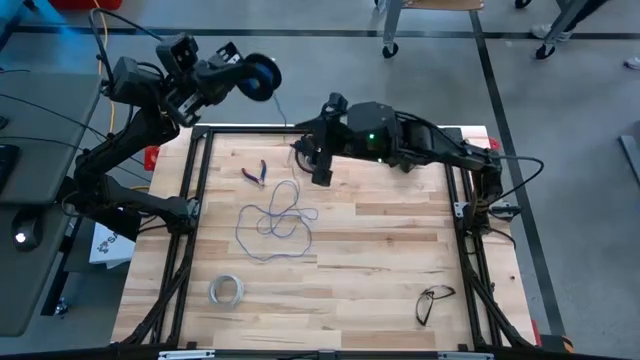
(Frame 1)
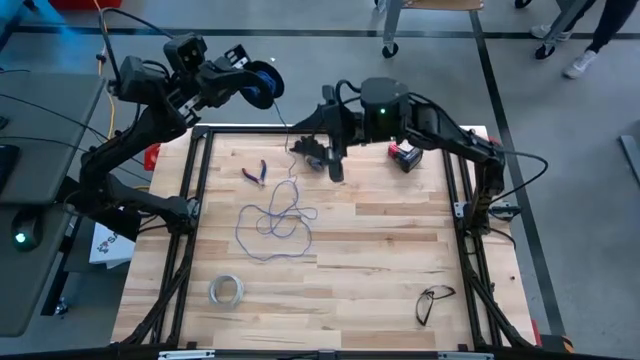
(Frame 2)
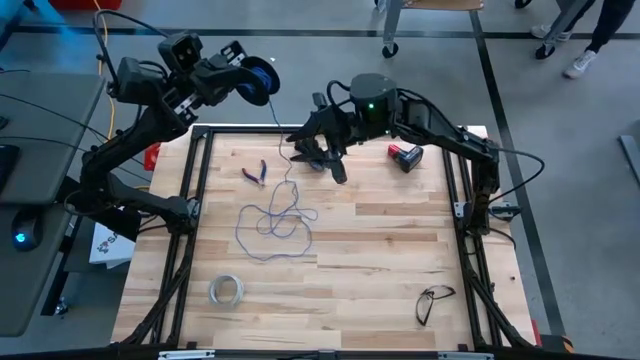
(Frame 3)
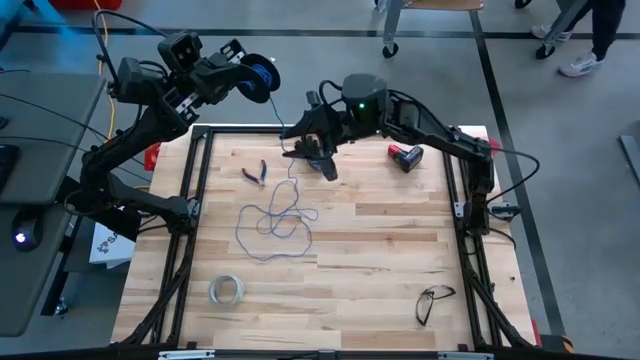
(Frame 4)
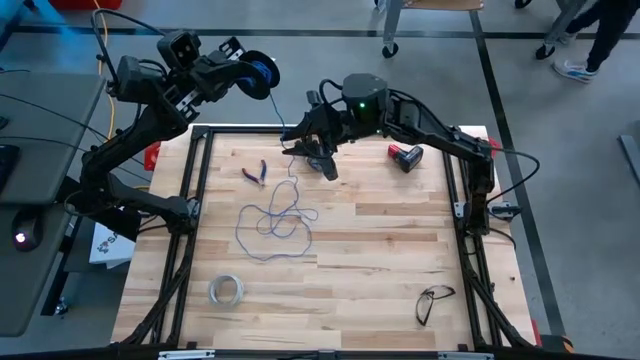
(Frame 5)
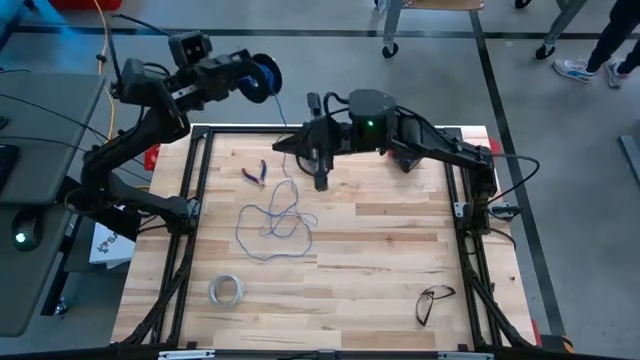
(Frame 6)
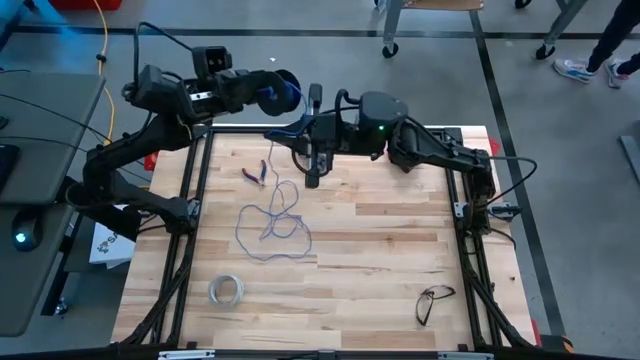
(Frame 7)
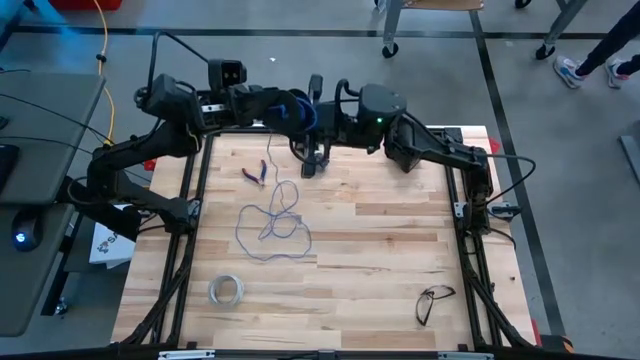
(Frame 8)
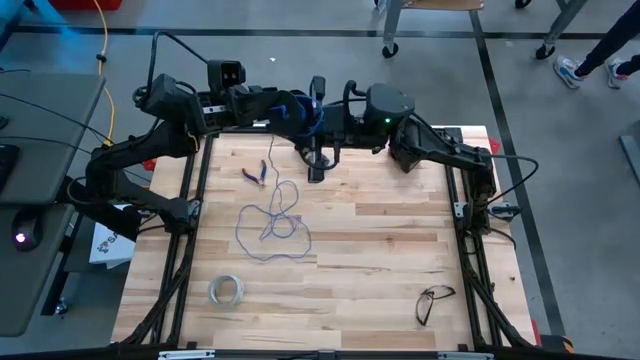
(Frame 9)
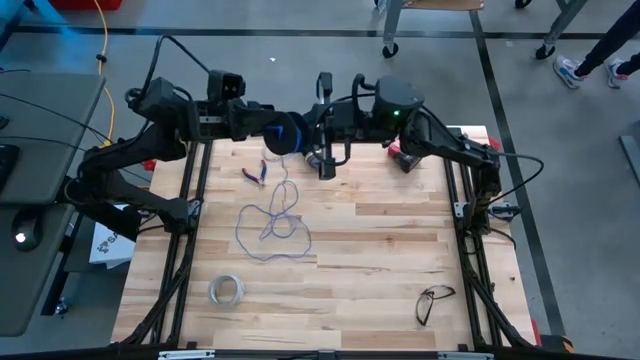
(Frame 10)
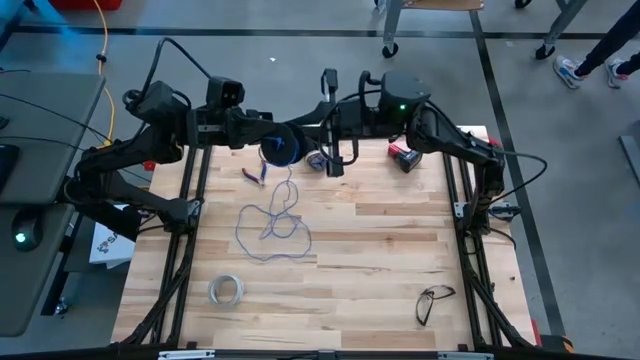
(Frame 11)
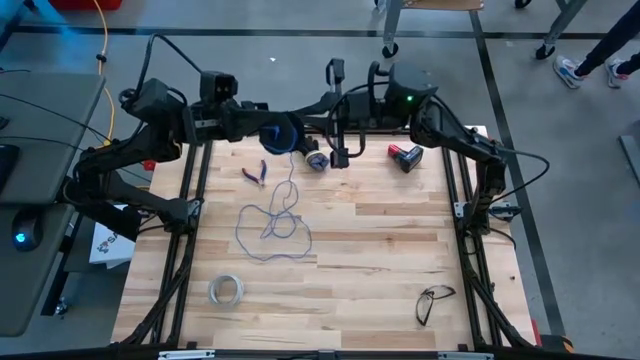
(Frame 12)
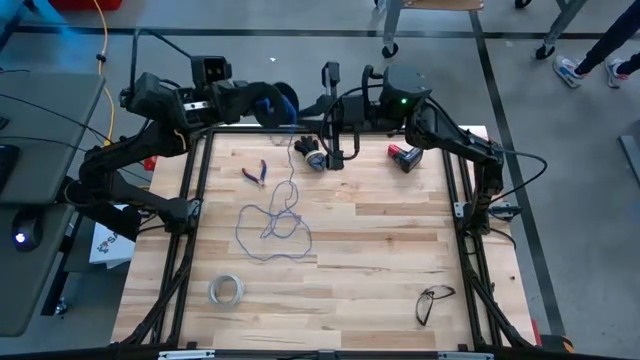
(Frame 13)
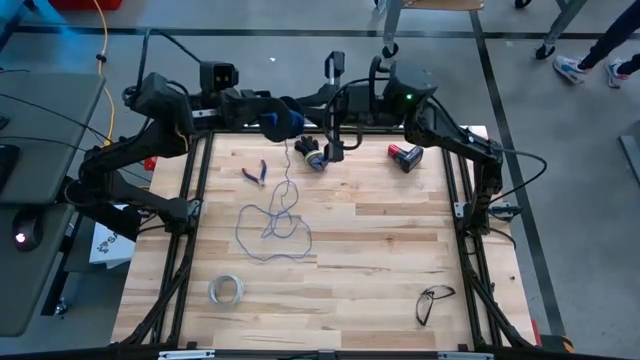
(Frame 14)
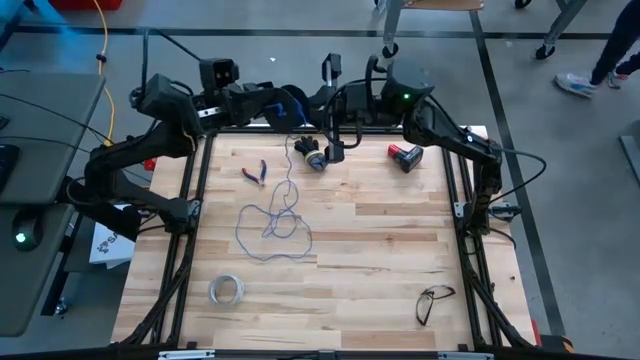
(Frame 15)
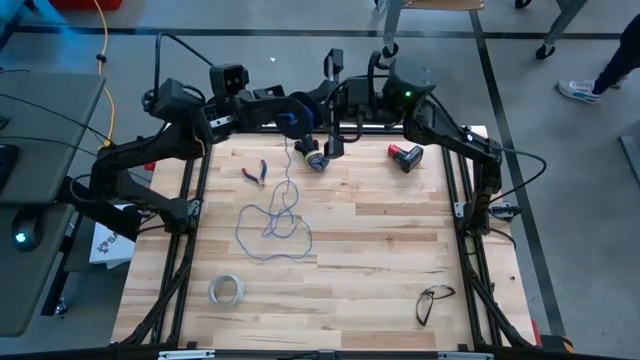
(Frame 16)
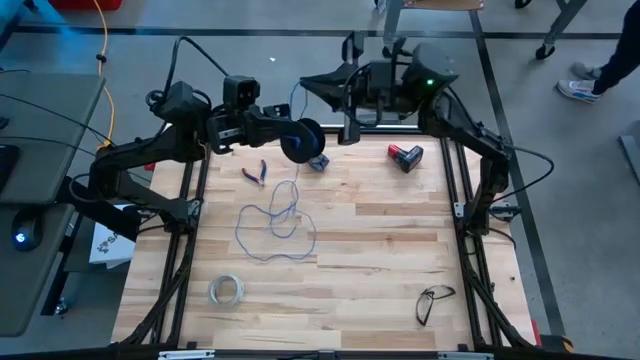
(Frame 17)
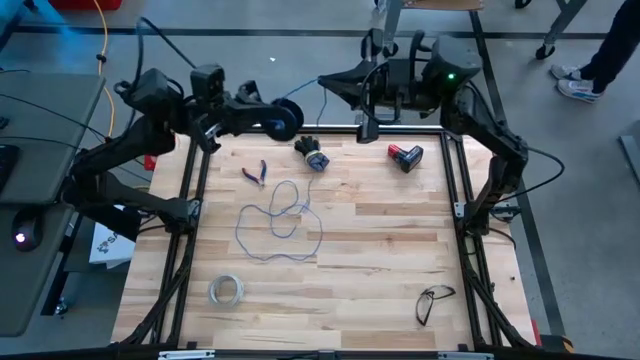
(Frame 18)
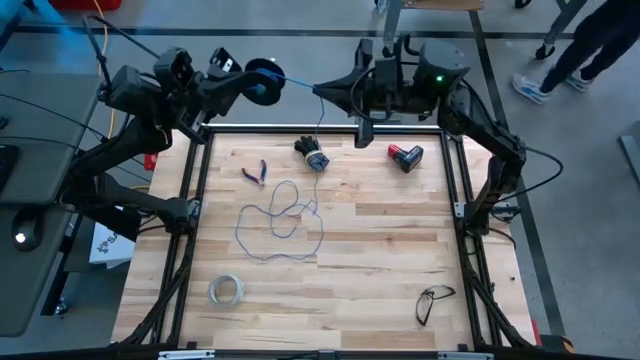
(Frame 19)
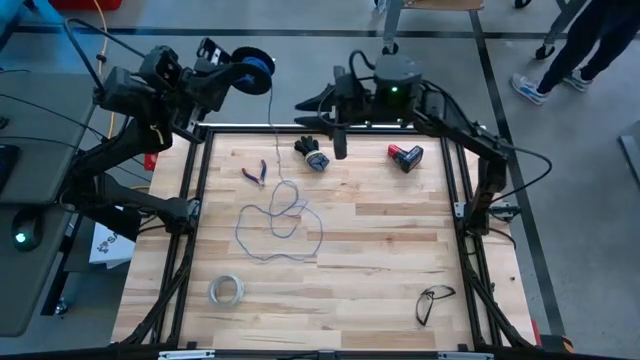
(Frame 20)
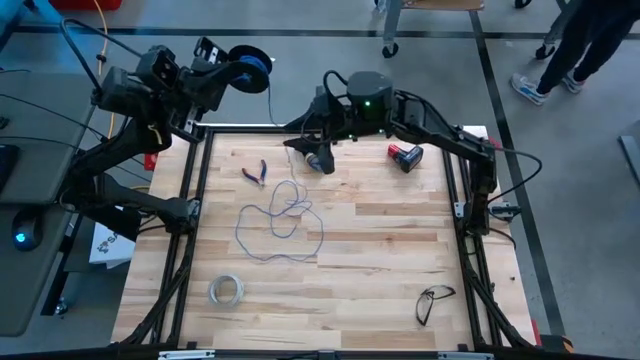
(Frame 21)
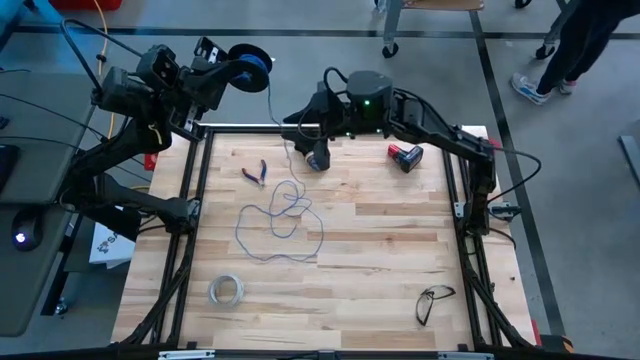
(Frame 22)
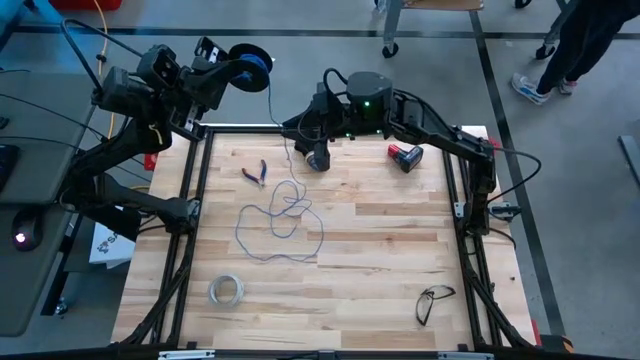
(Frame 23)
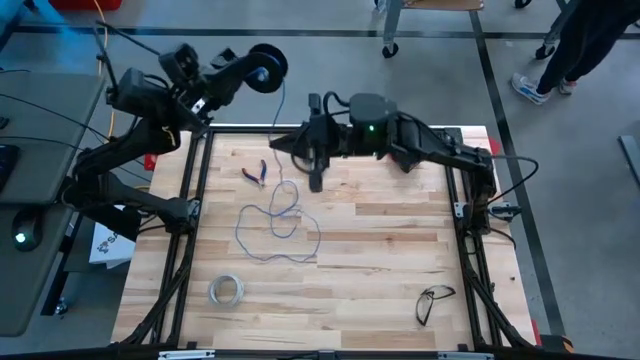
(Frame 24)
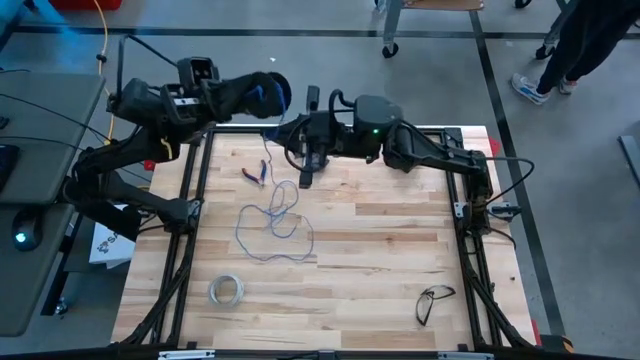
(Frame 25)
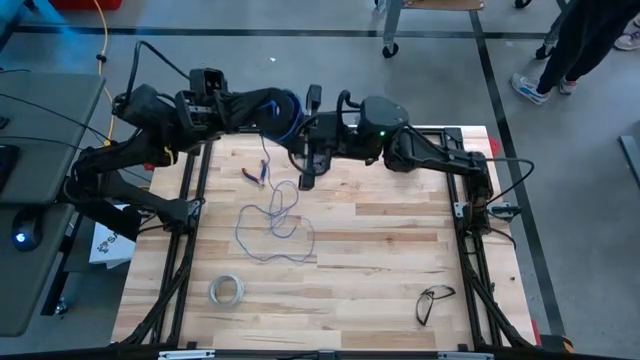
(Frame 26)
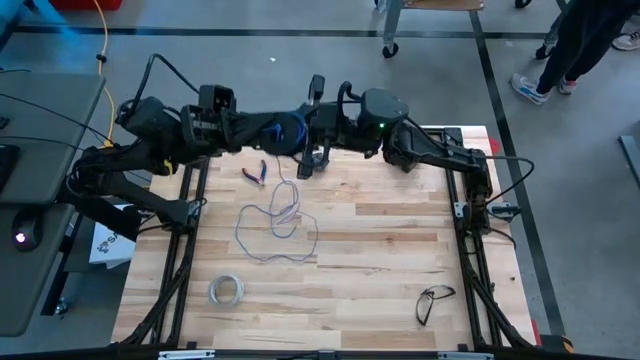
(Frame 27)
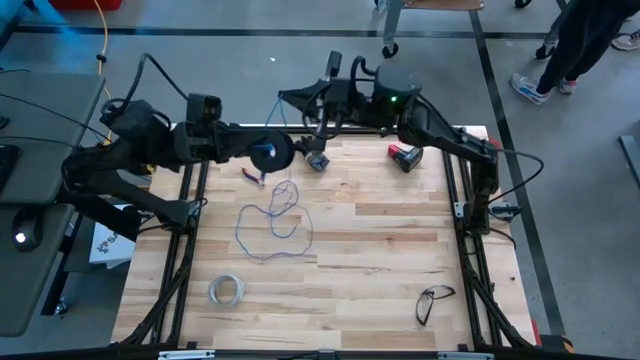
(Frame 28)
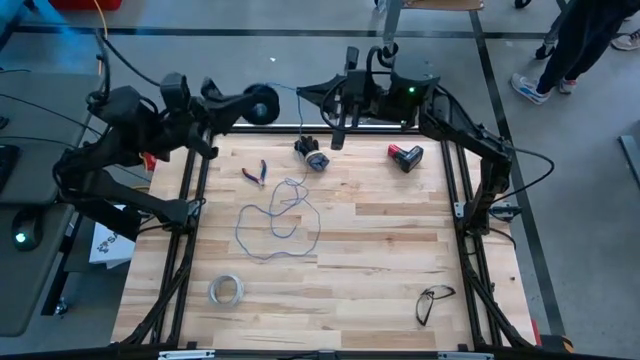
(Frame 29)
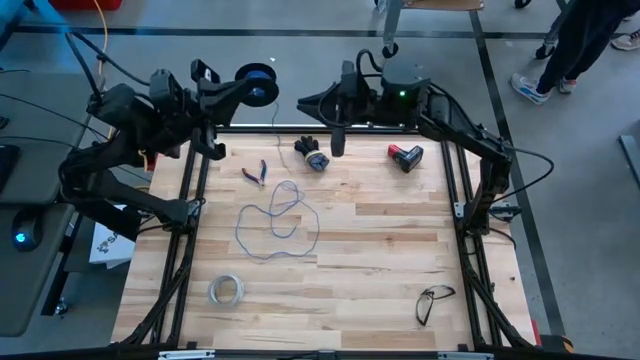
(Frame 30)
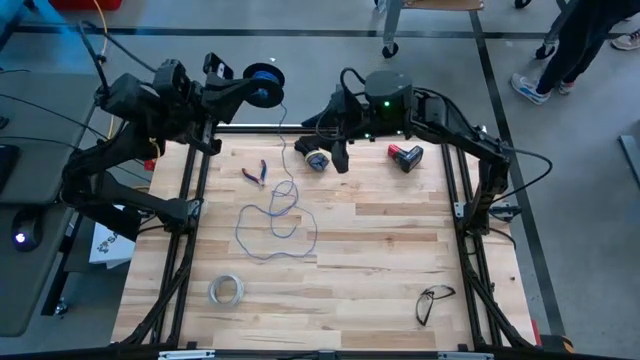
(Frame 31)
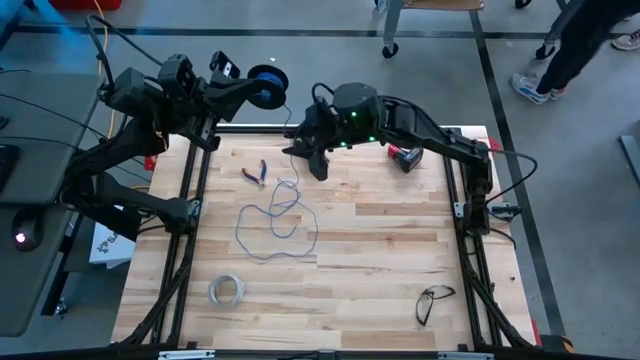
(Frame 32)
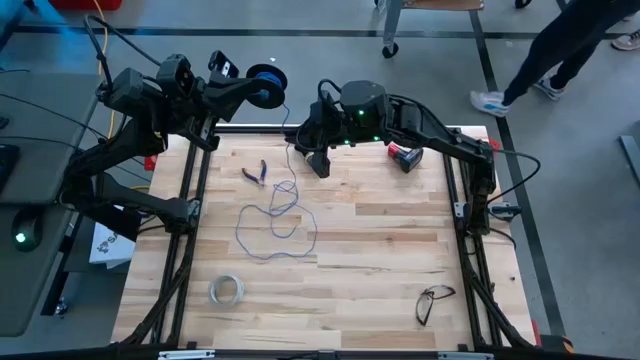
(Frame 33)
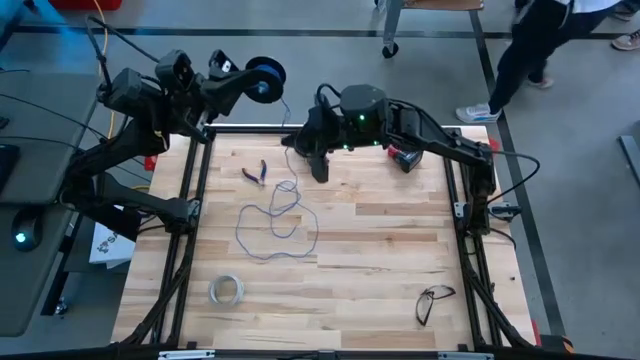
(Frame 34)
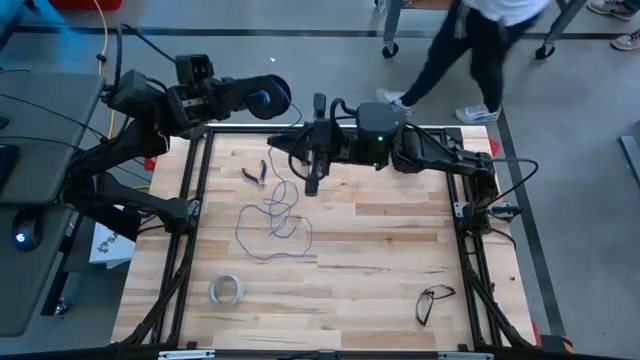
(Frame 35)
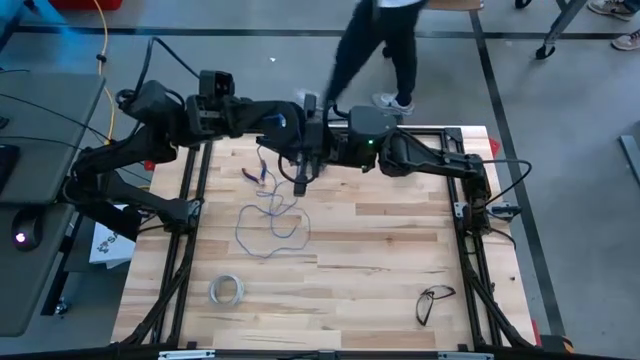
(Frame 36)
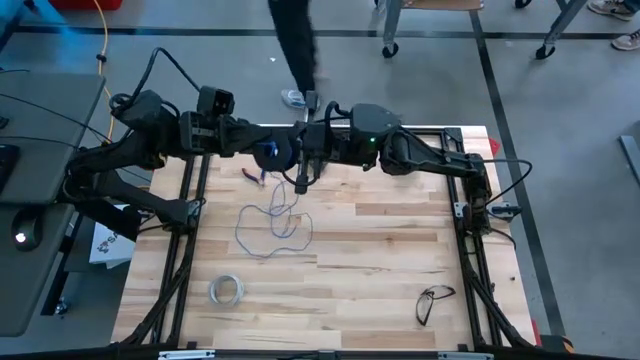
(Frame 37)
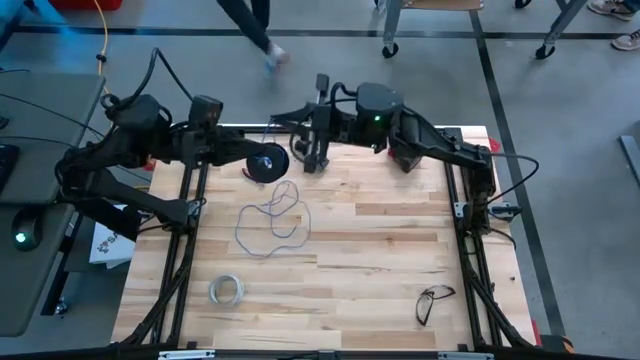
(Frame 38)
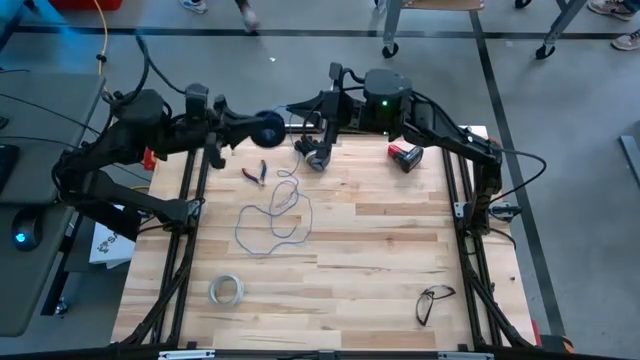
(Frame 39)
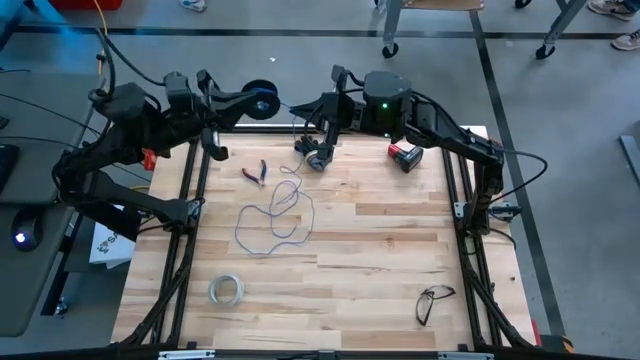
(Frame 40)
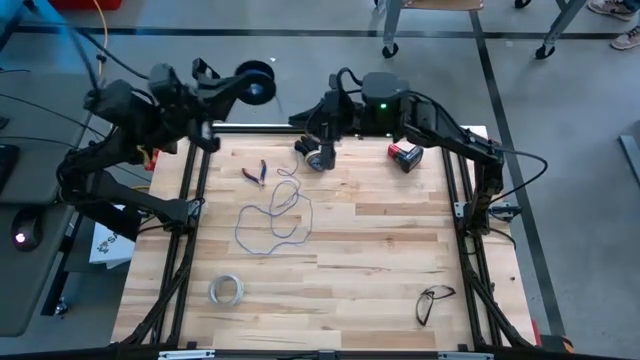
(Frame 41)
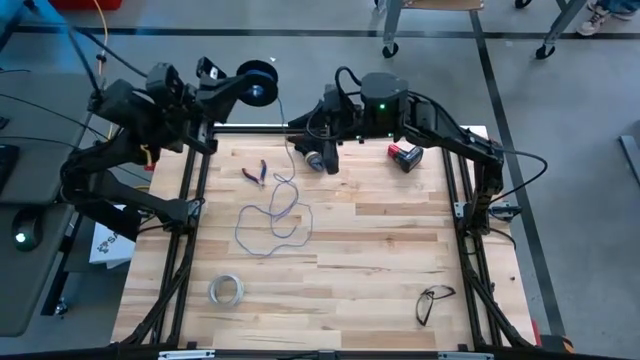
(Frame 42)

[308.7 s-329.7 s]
Task: Coil cords
Coil the blue wire onto the black spool

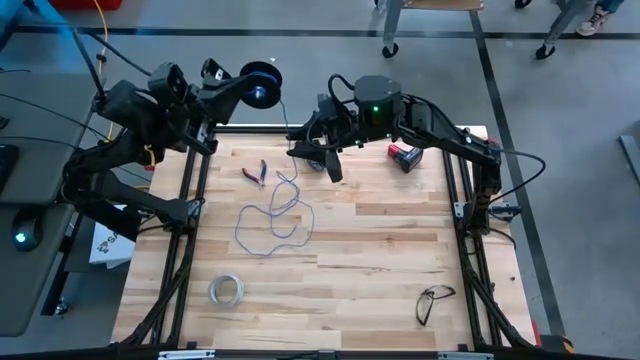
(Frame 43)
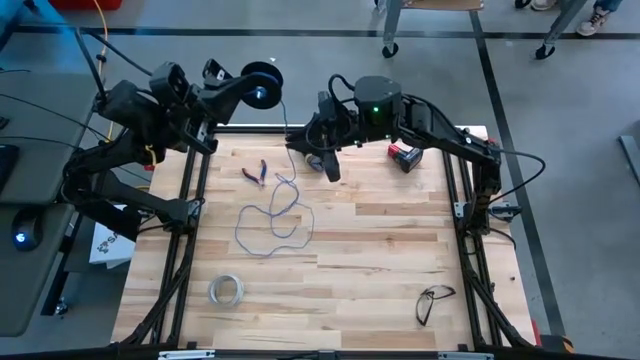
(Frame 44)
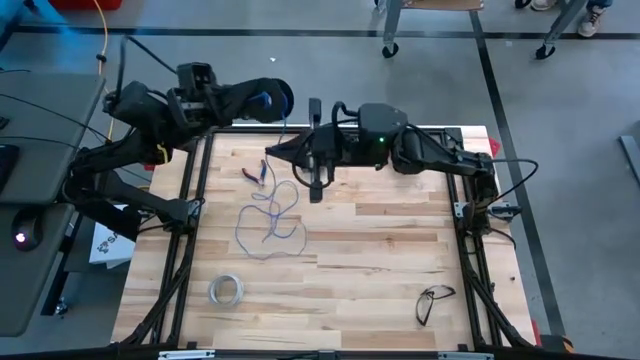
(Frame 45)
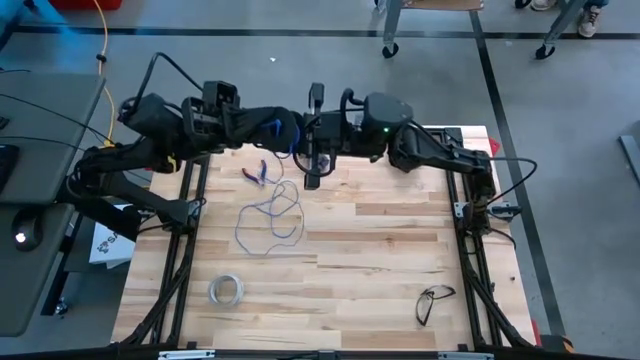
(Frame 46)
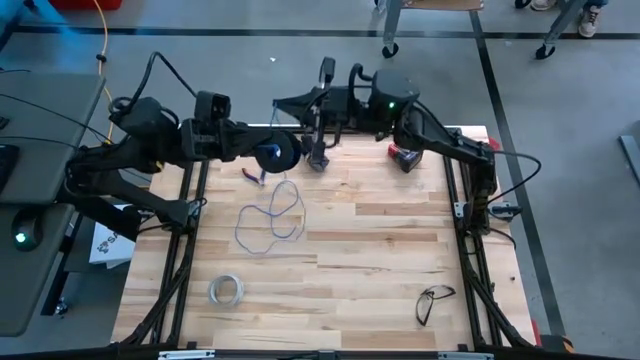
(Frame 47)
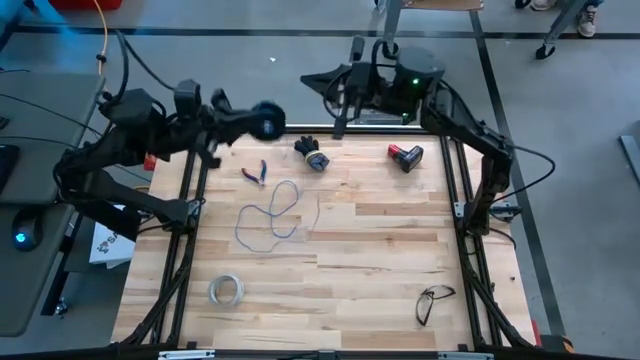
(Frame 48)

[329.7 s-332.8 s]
Coil the blue wire onto the black spool
